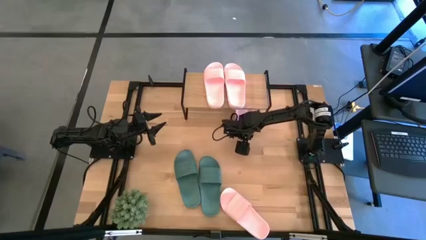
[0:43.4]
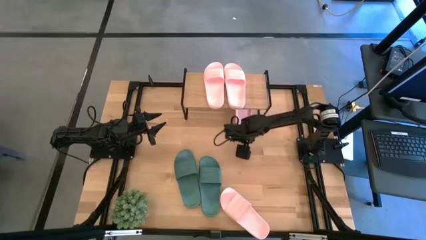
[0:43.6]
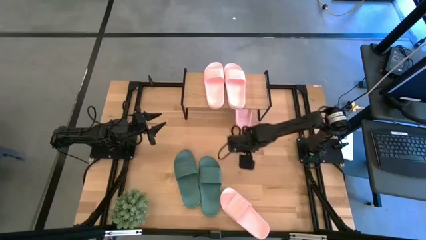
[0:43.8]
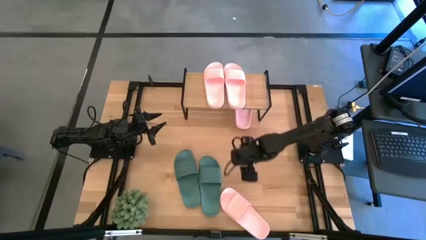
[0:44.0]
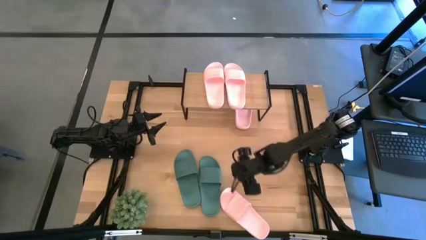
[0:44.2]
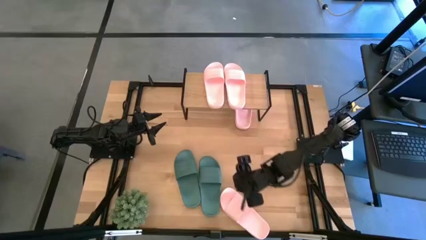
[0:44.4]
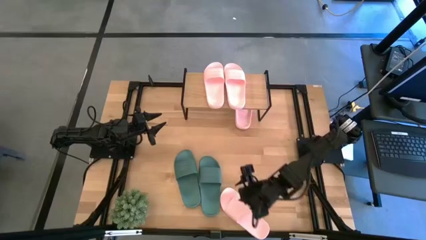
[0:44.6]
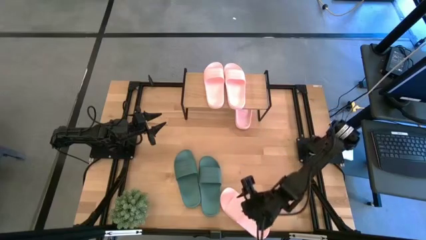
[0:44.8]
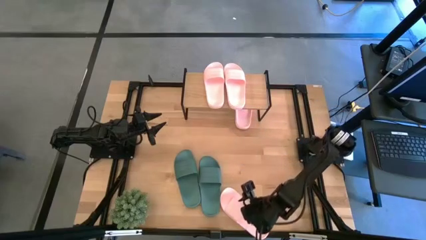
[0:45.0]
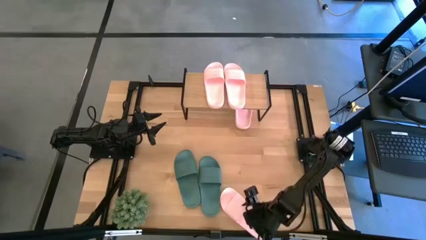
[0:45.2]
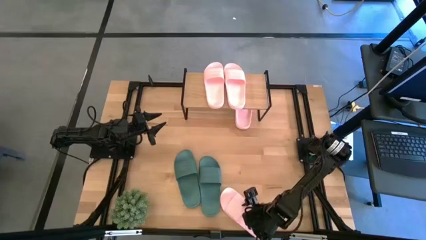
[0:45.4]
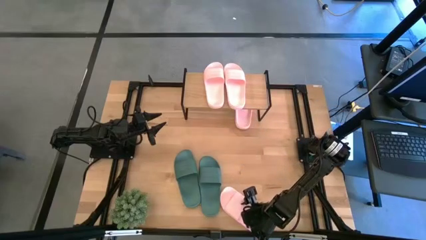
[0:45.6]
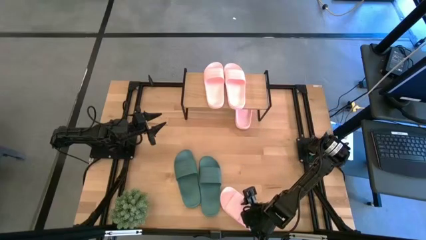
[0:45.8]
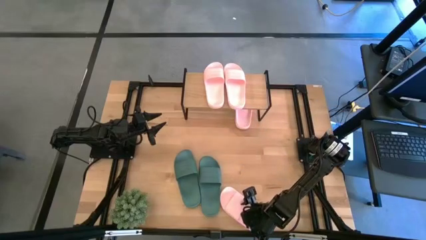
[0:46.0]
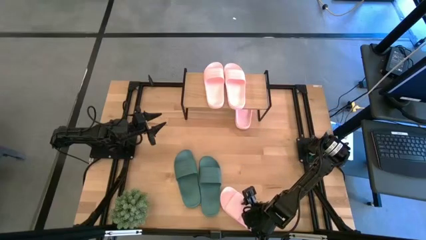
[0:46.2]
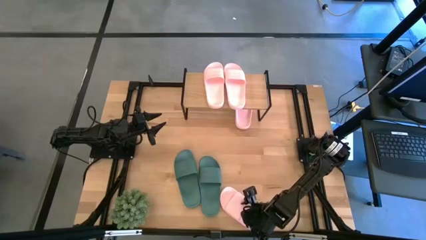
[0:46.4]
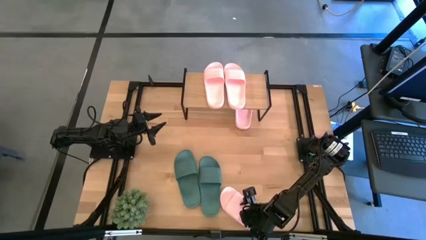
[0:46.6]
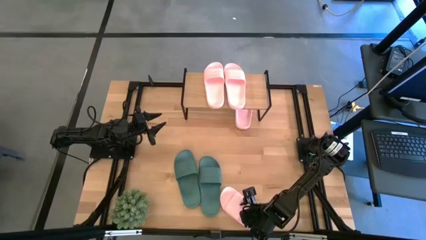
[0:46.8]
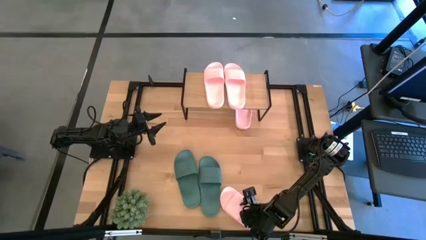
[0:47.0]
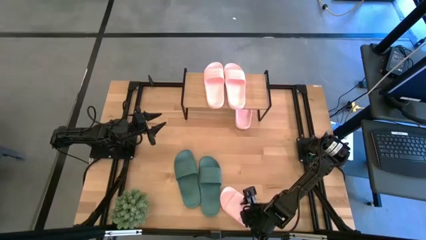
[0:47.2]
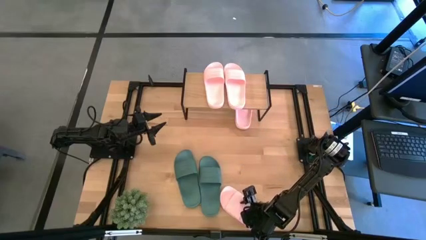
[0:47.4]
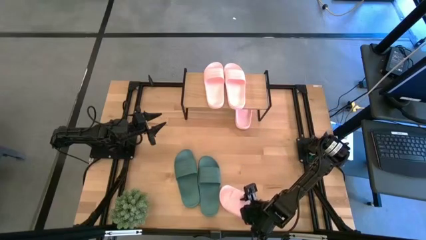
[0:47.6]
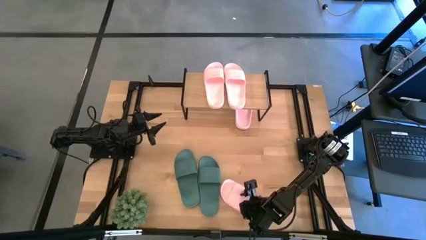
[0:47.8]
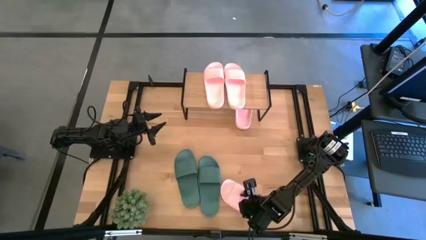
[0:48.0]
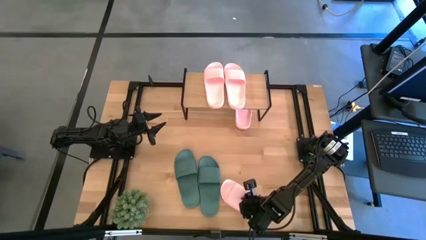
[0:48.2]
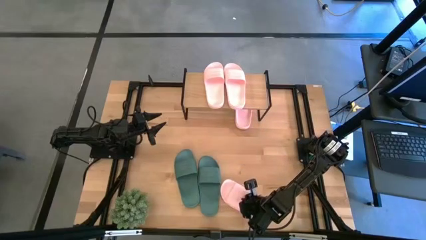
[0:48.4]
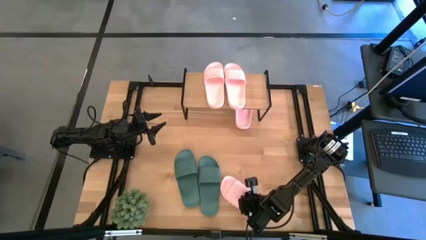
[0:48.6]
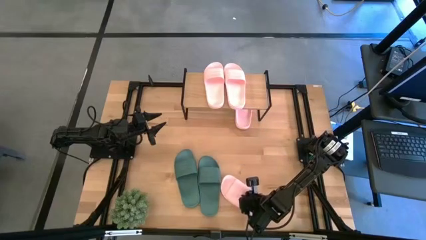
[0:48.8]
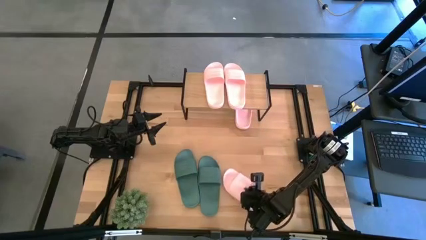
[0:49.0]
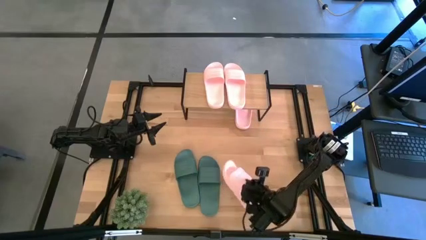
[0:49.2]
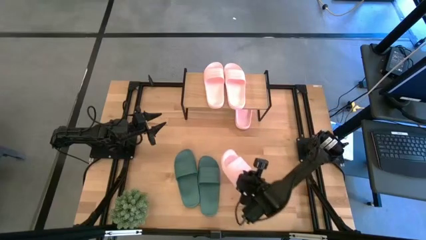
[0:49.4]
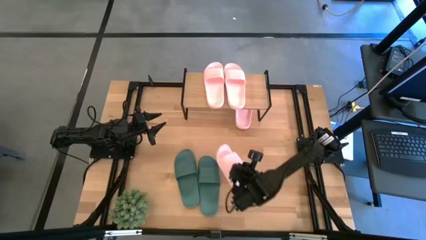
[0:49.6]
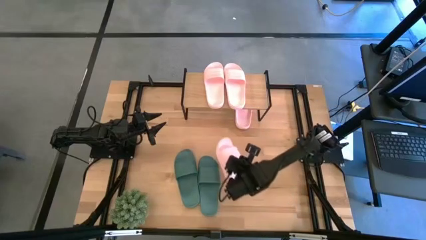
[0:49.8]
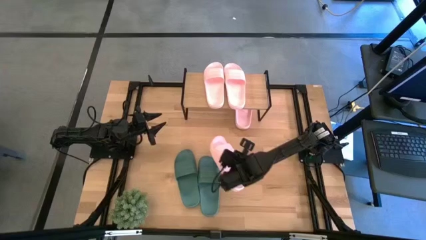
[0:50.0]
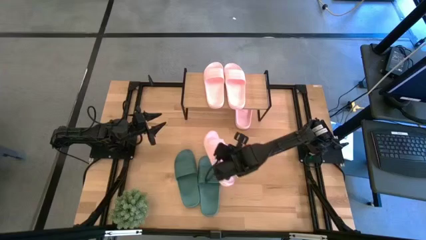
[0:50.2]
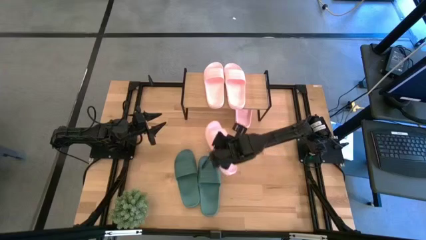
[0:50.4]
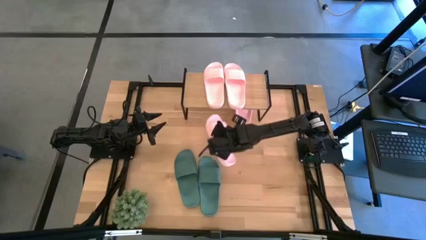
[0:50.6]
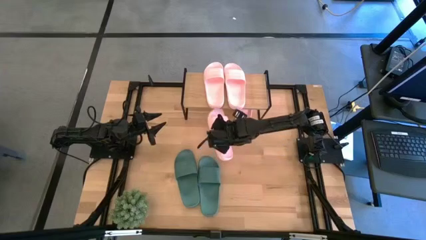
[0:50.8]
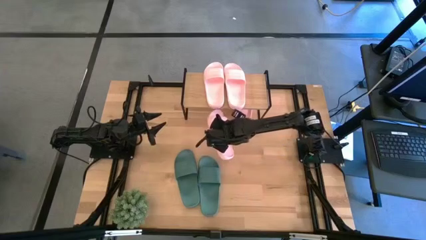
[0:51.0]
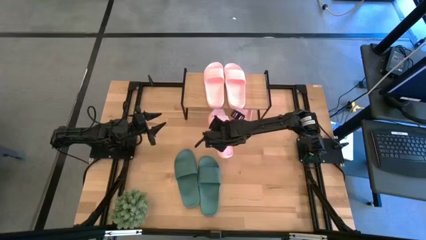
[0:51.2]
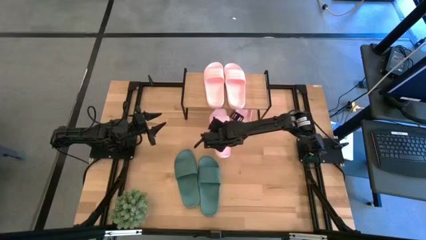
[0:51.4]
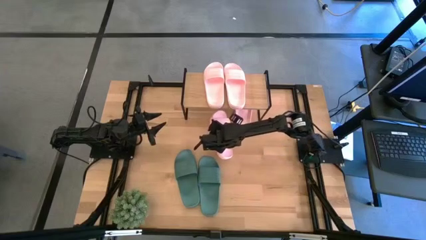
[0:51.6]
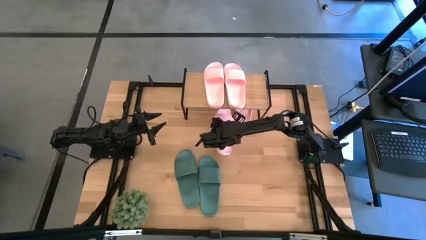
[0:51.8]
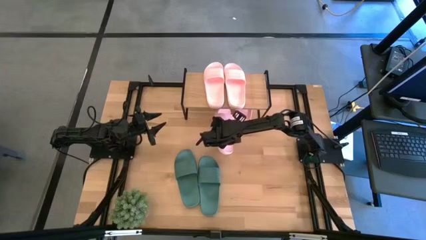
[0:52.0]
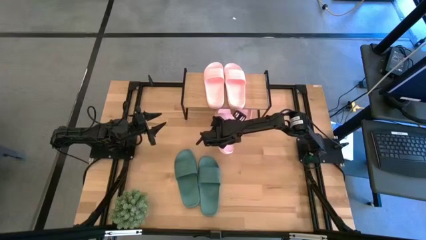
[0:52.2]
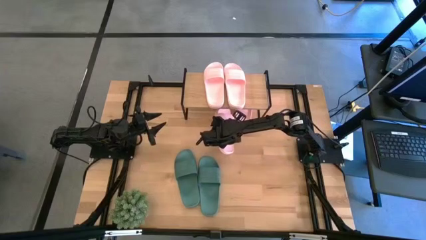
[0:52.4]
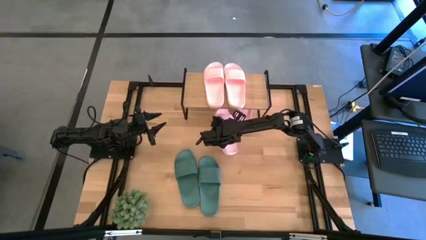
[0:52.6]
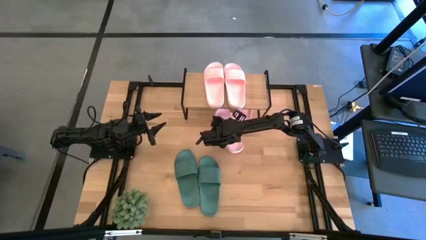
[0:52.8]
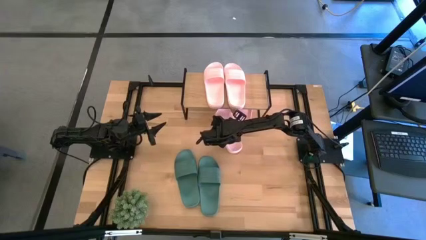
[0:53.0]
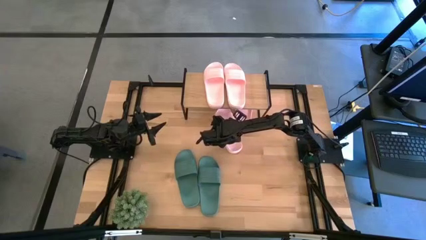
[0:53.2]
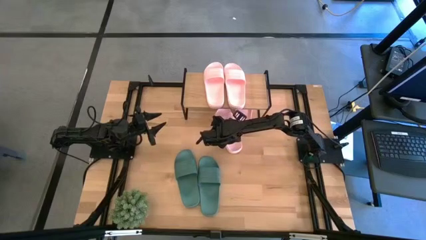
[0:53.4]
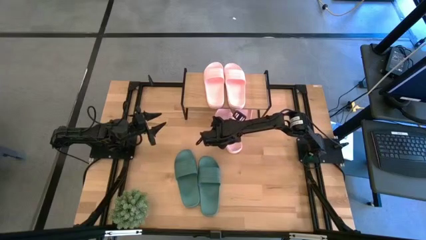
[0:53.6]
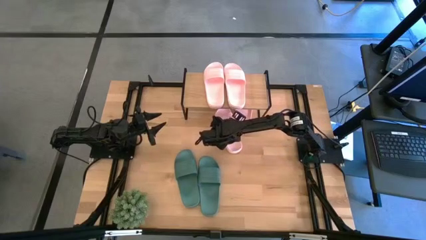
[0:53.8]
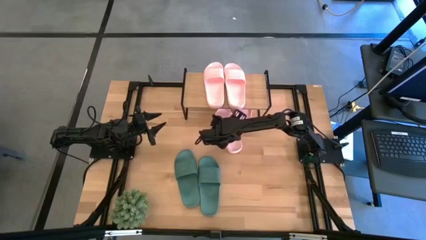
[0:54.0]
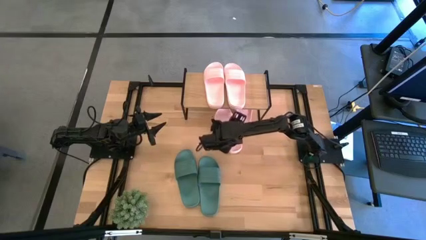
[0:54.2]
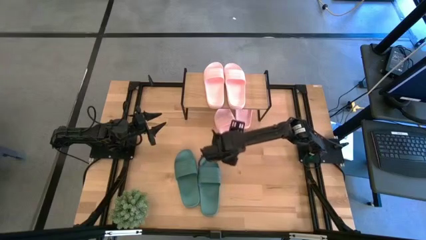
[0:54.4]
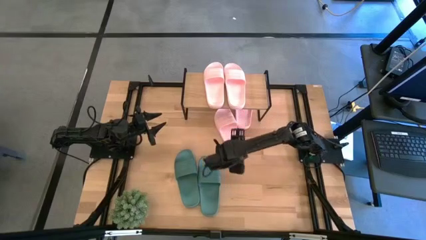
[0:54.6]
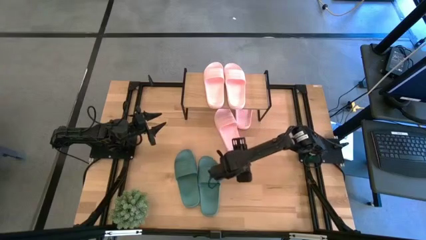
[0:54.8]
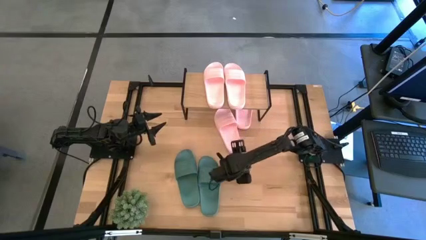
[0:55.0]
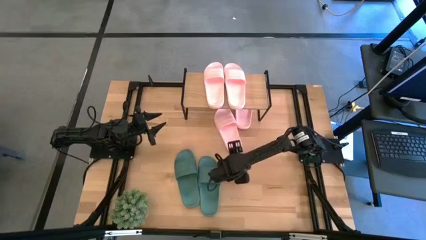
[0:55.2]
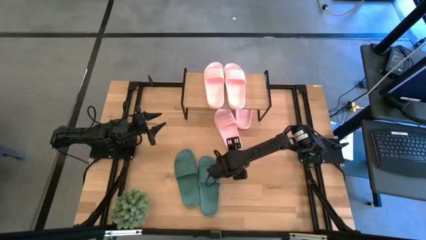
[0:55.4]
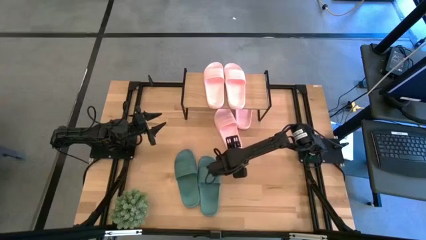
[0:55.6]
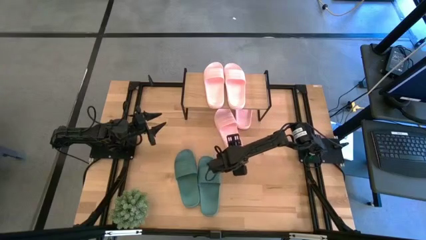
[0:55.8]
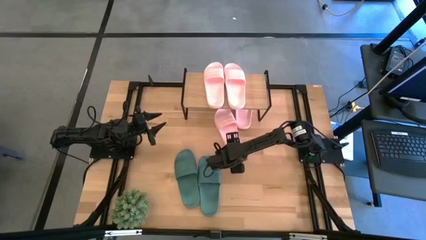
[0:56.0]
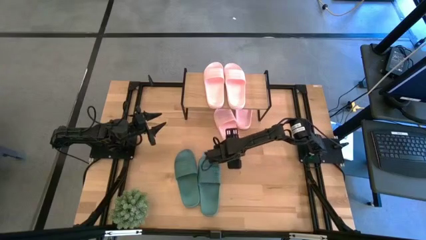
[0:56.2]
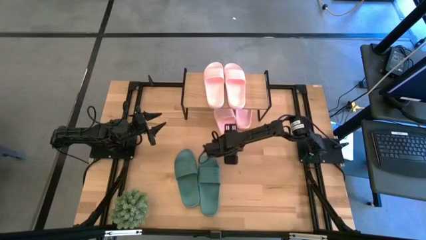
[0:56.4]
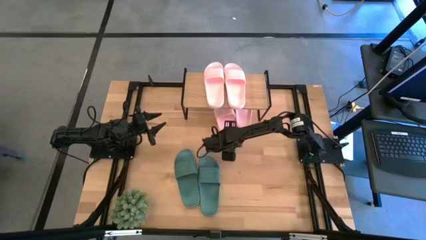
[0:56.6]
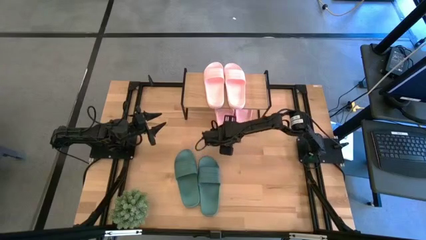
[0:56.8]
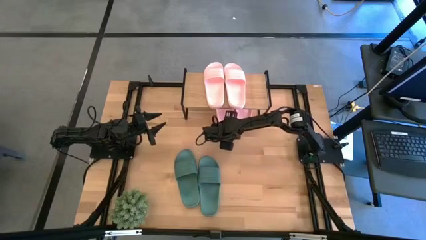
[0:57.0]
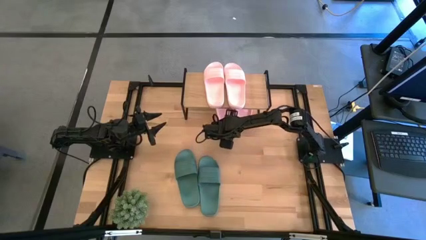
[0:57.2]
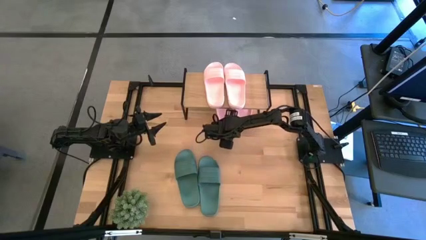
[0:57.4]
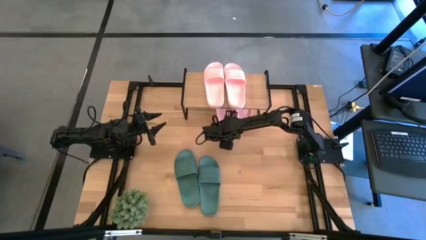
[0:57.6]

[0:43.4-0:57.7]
Task: Pick and place slides into the shelf
Put the pink slide under the shelf

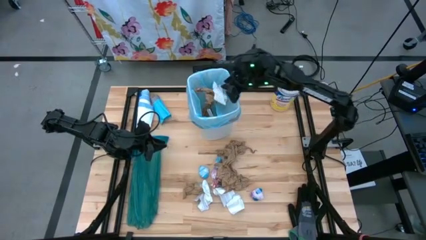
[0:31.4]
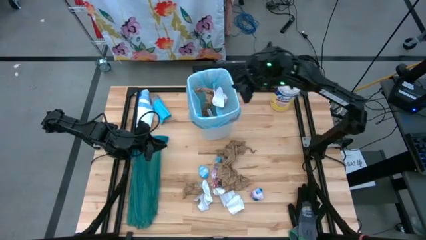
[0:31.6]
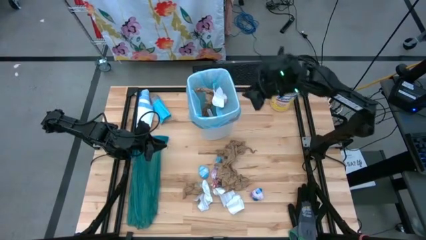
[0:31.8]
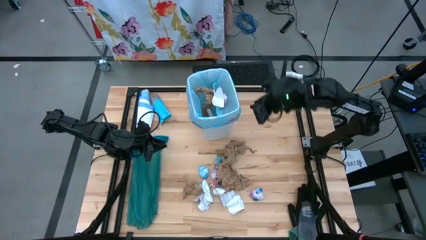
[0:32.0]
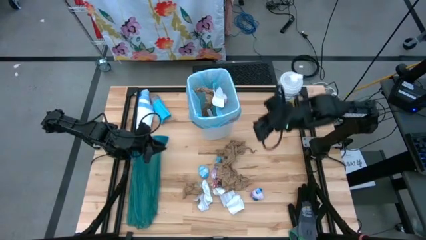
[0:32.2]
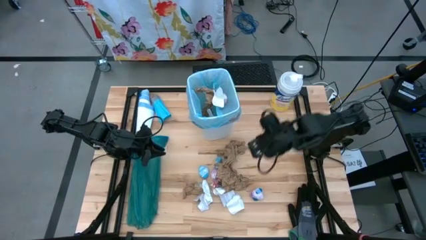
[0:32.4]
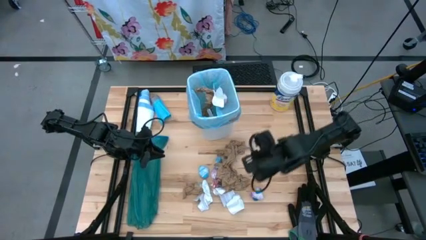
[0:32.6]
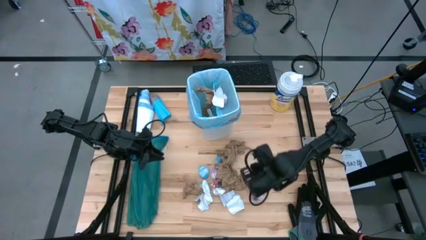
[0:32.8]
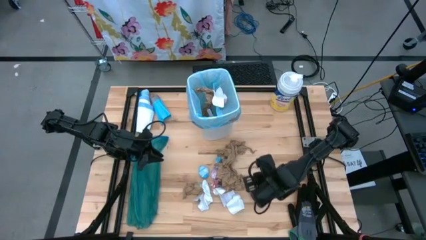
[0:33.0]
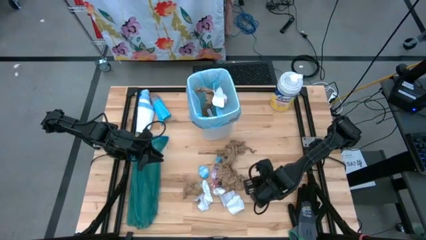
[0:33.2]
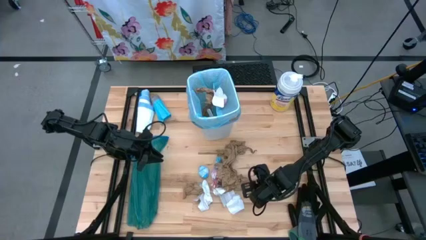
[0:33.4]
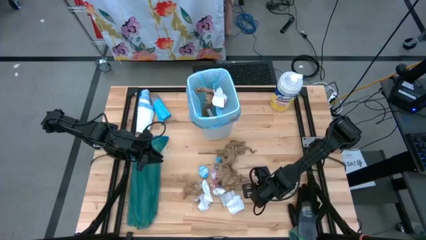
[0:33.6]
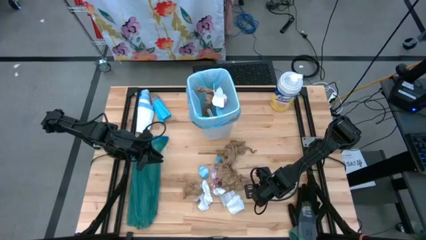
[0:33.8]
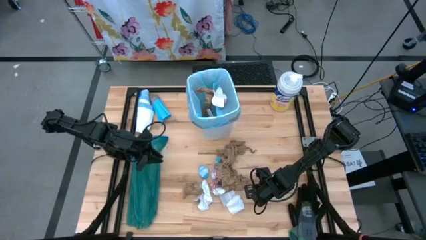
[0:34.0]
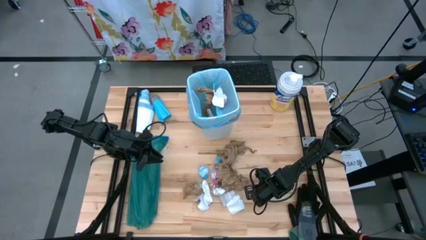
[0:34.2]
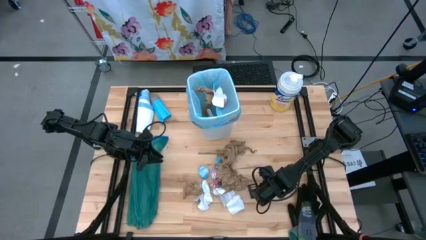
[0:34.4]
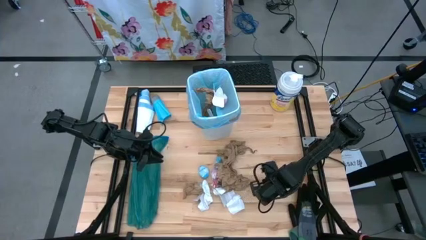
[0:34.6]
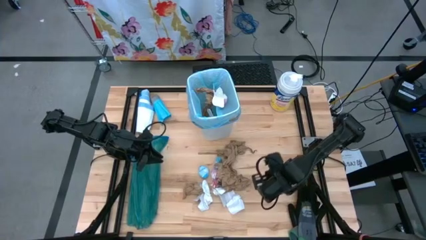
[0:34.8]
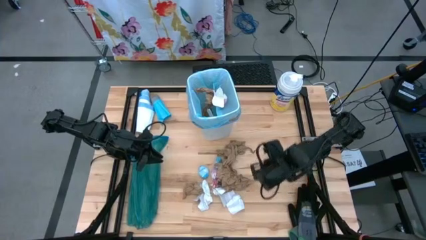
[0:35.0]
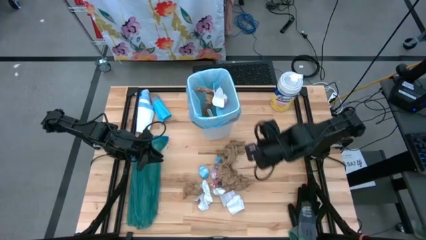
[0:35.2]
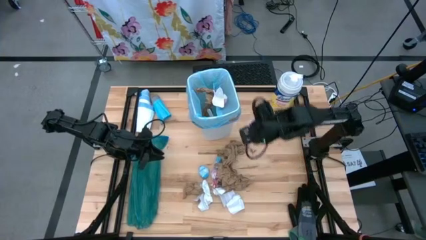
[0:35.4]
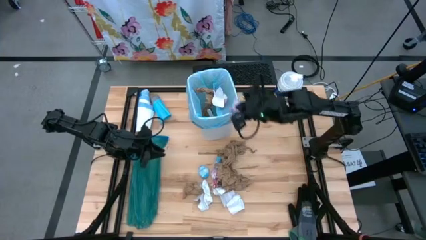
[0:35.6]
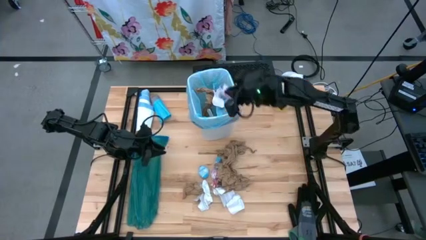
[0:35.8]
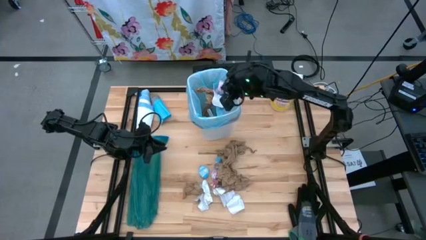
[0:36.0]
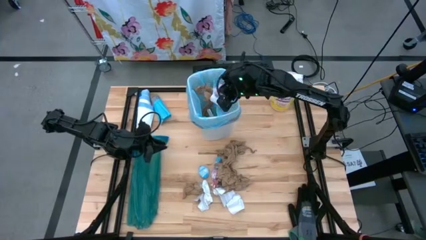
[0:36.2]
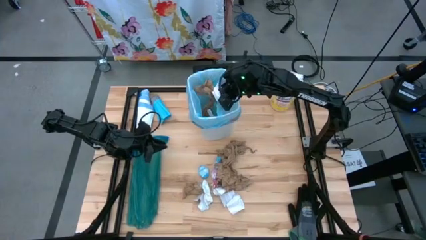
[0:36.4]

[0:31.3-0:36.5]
Task: place trash/remove bag and relplace
Put the pink plastic into the trash bin
